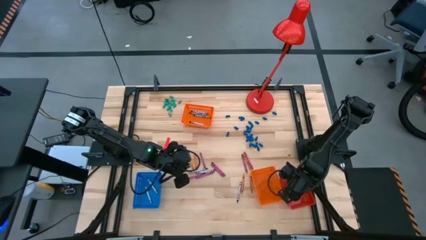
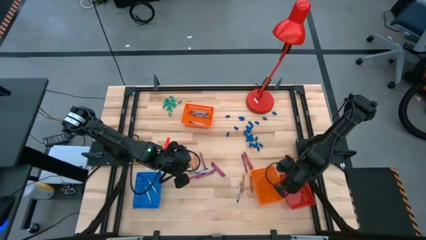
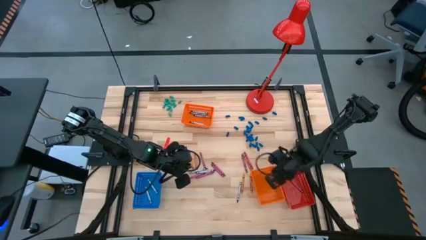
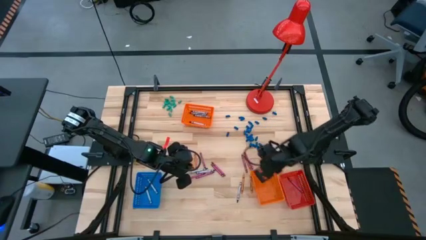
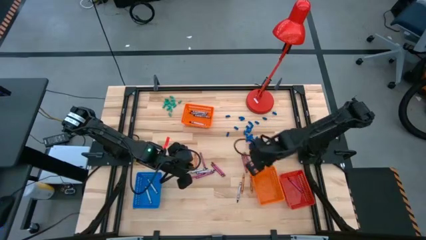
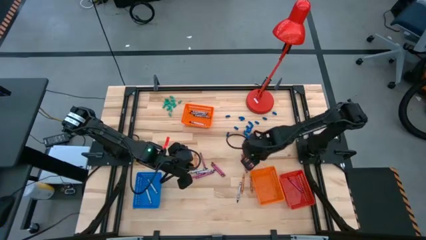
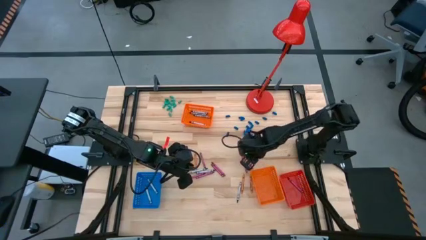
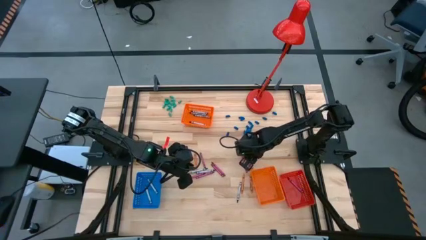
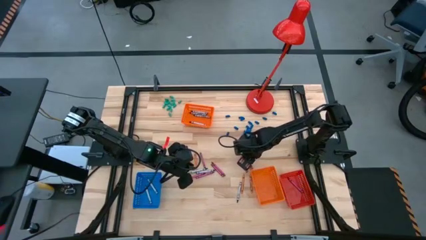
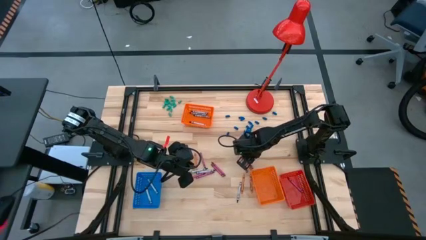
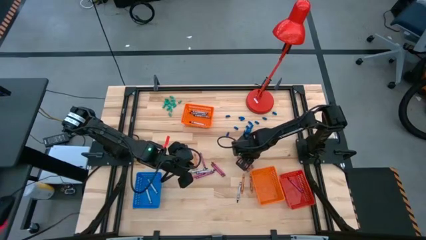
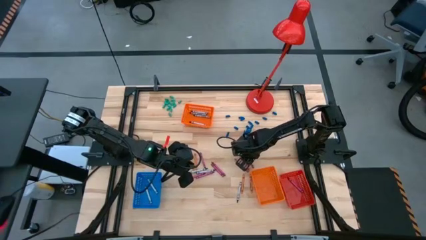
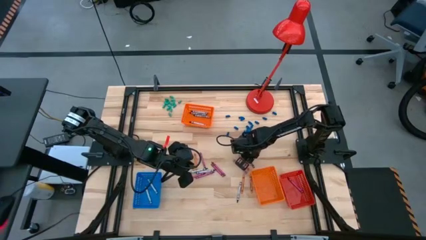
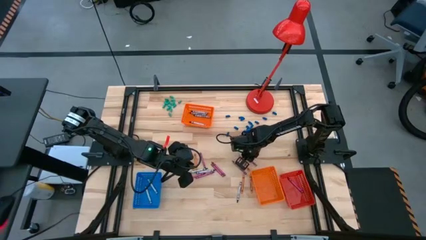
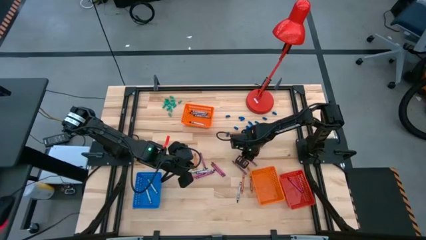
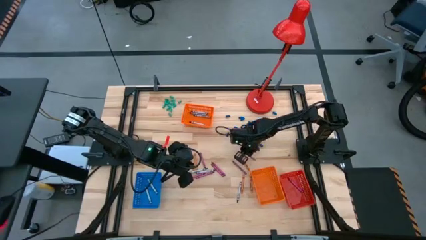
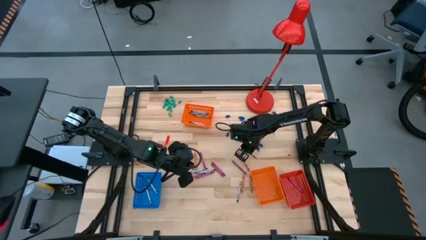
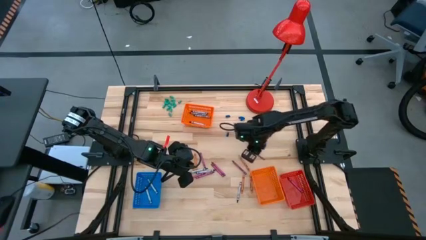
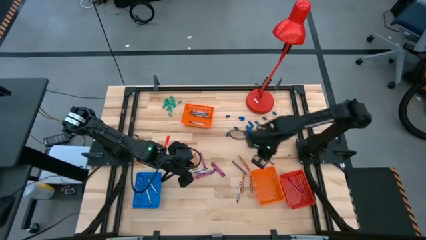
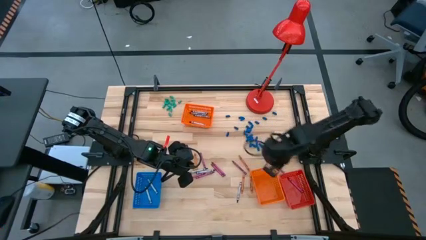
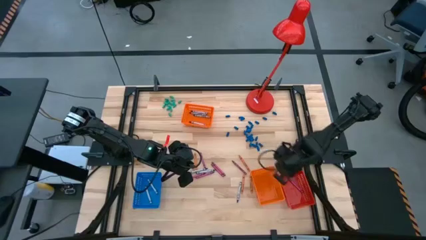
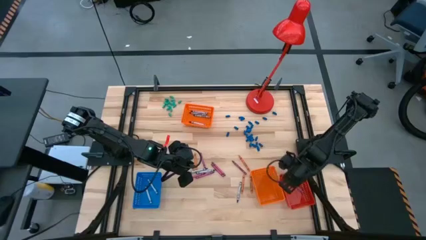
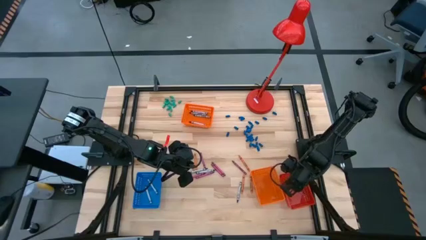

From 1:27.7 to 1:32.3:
Task: Sort crayons
Put the red crayon into the red bin

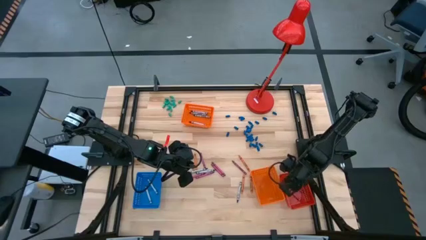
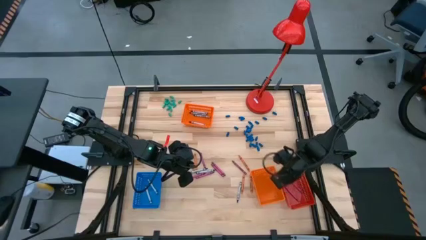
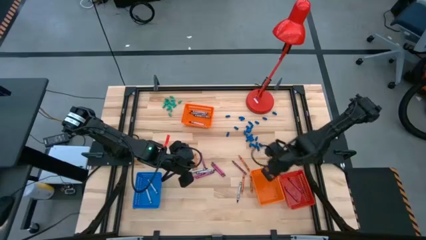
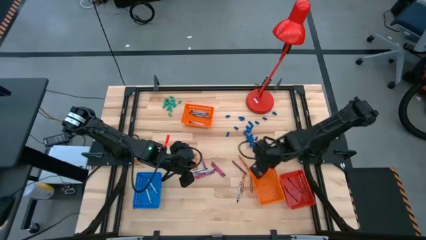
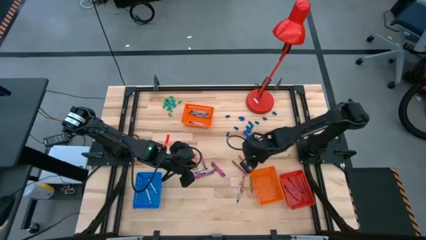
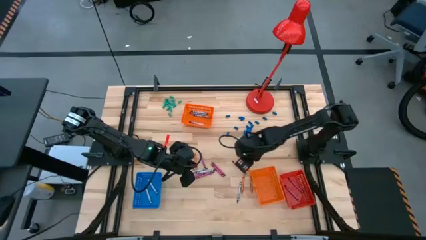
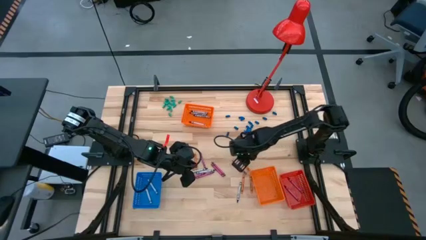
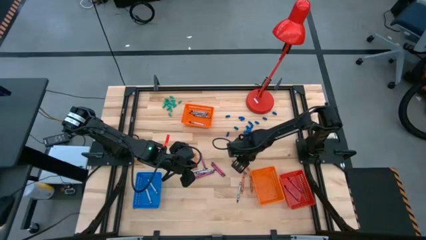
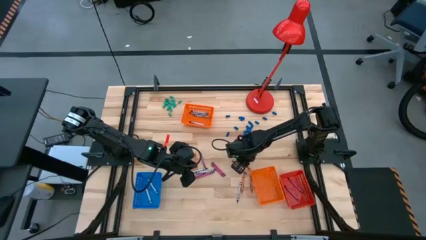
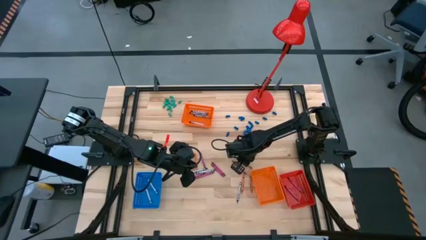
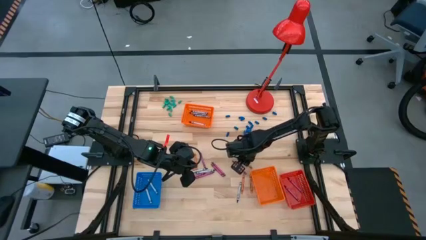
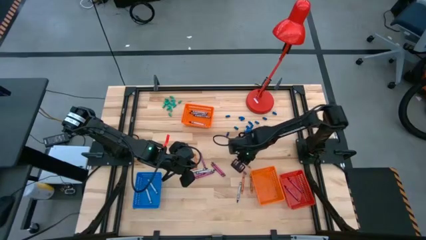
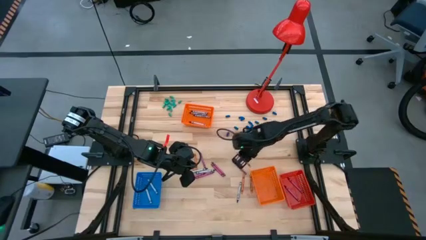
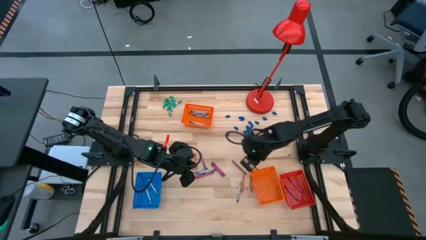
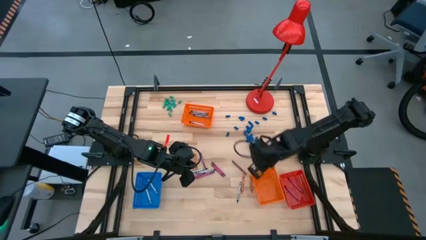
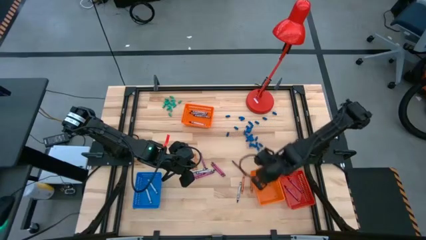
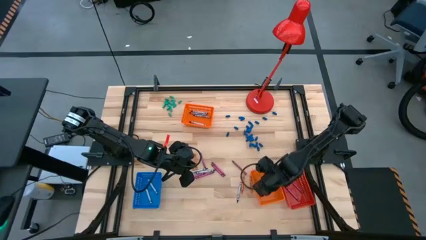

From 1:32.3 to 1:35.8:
Put the orange crayon into the bottom orange bin

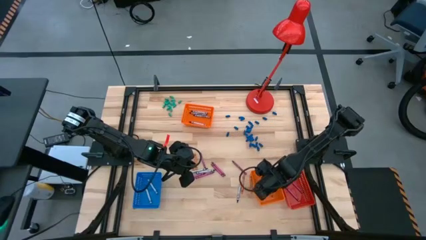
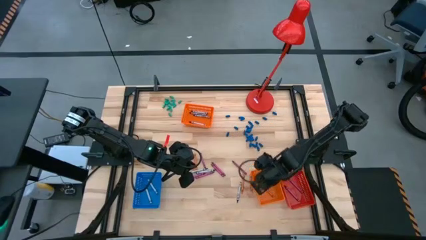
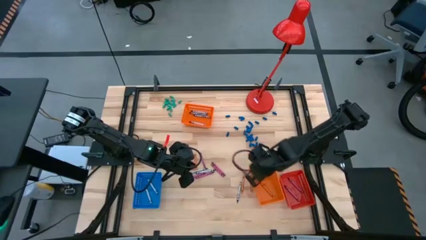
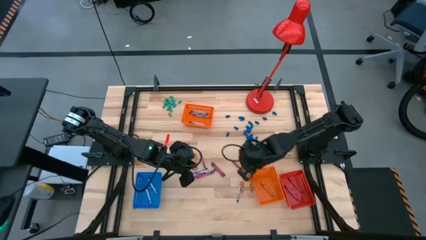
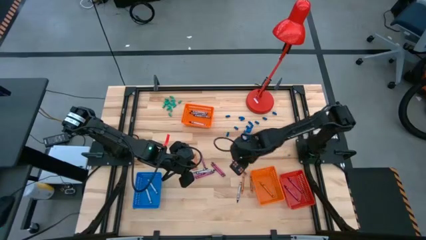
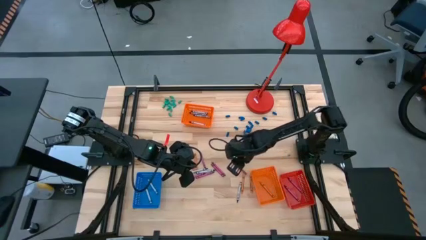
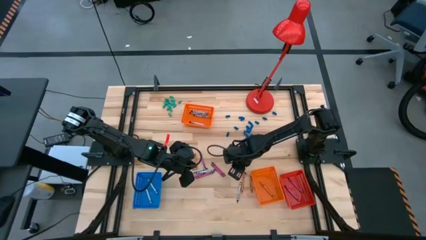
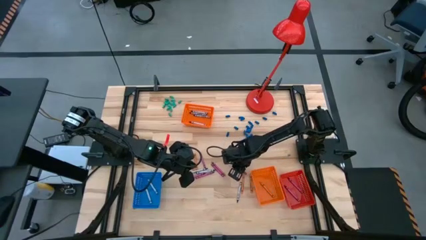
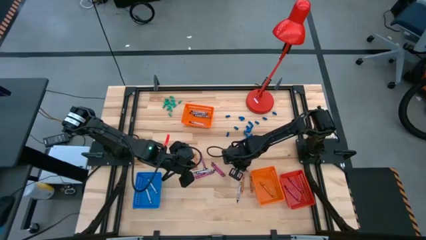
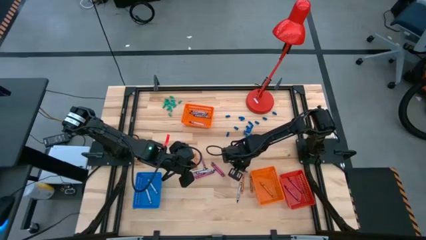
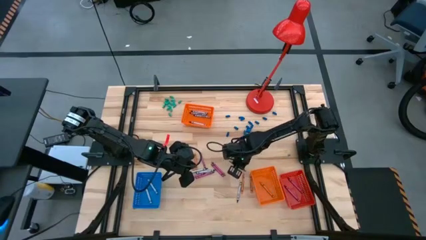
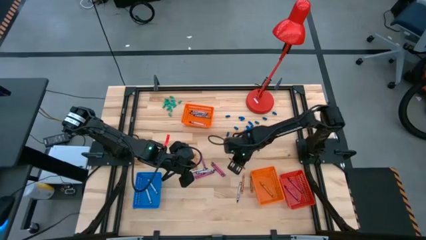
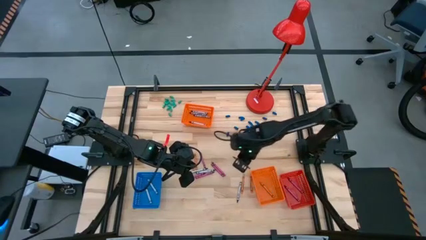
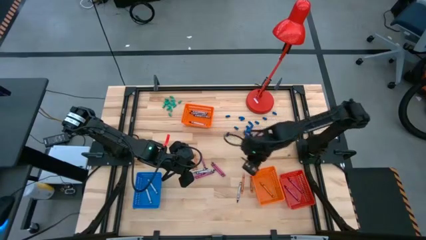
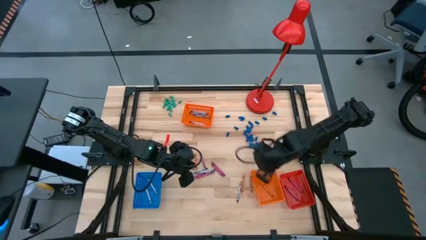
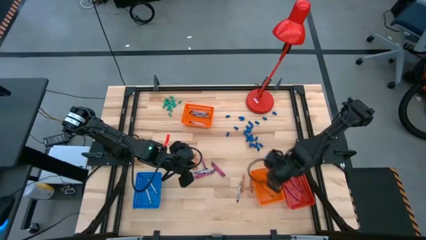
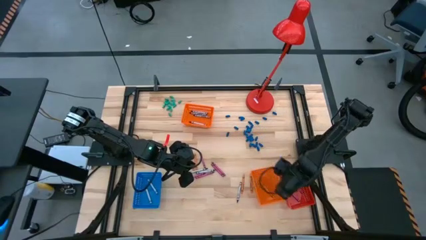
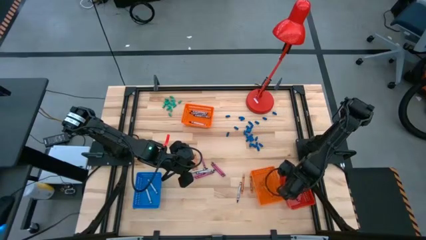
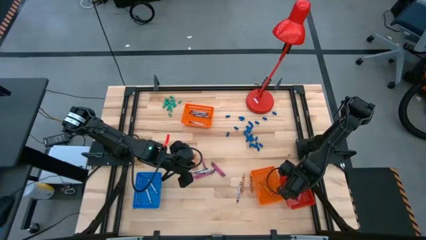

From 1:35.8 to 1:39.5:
Put the red crayon into the red bin

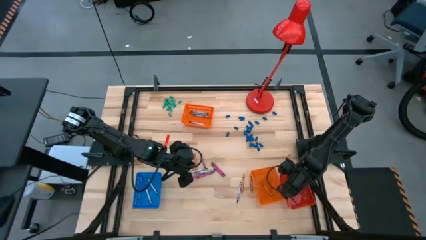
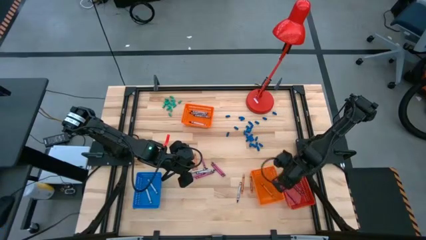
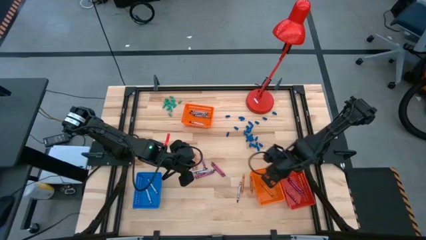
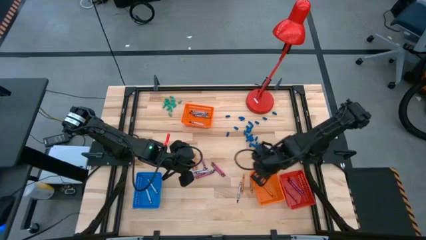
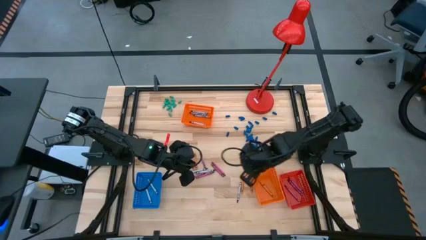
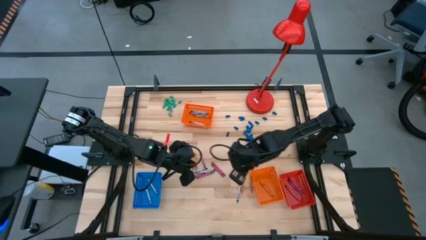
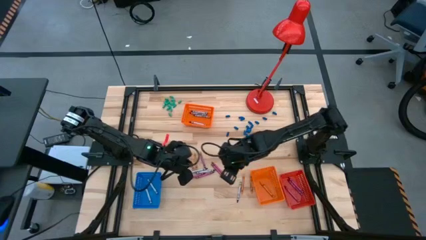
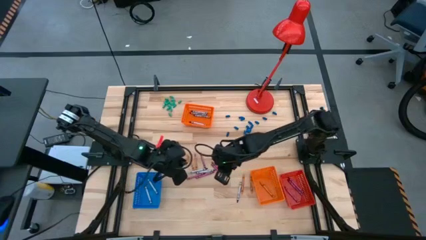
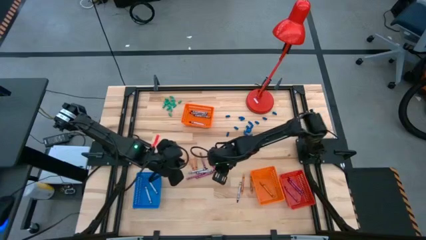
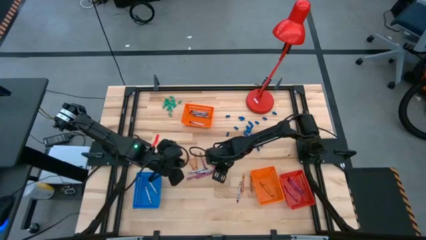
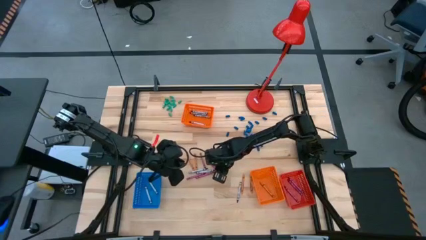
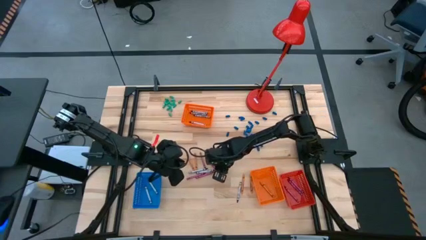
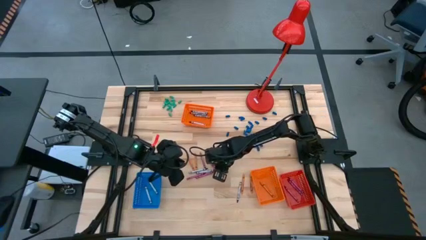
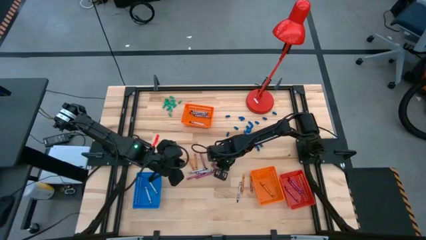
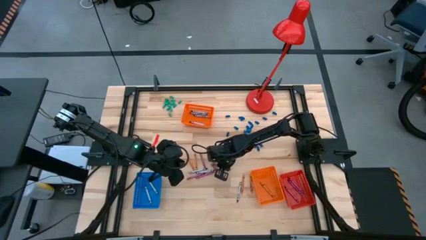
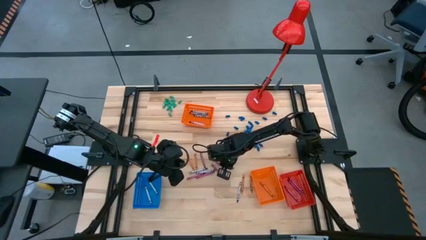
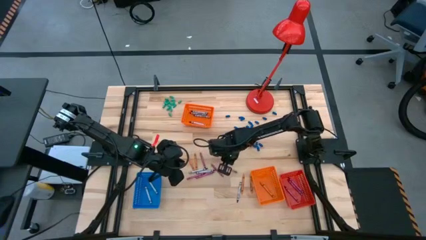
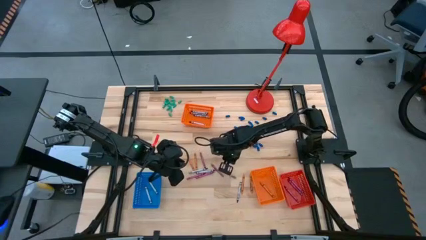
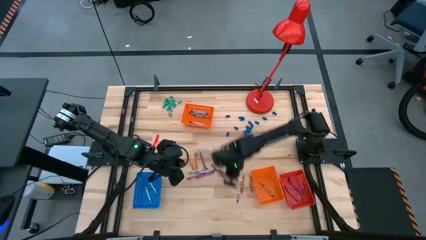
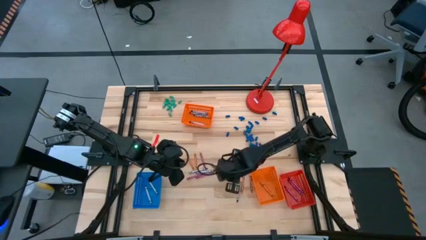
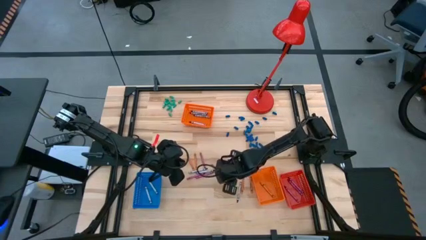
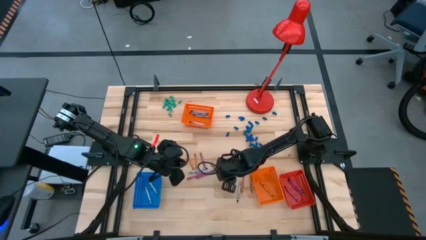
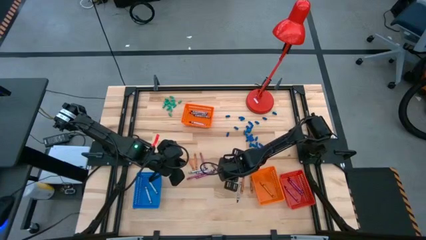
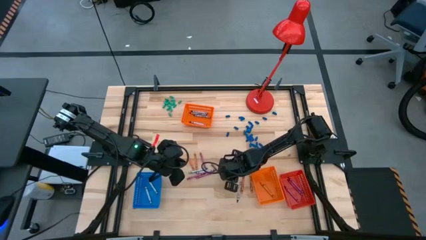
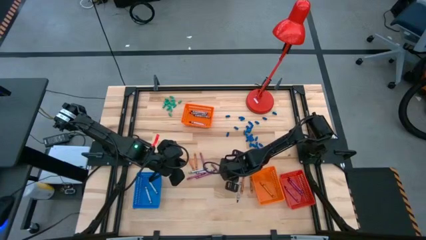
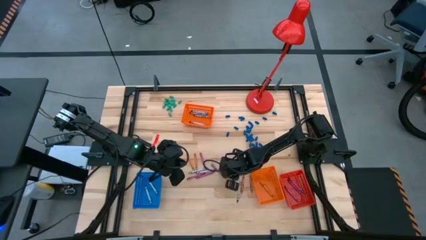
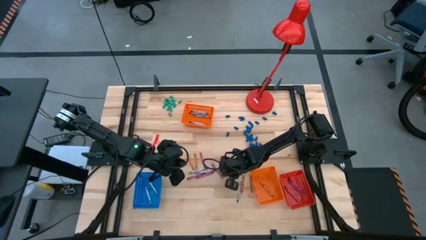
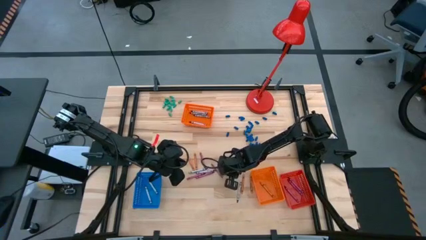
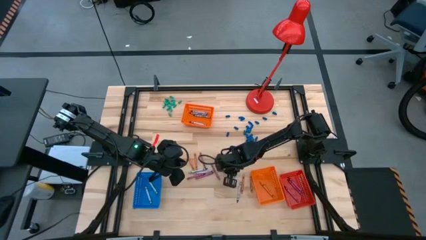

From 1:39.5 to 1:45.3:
Put the red crayon into the red bin
